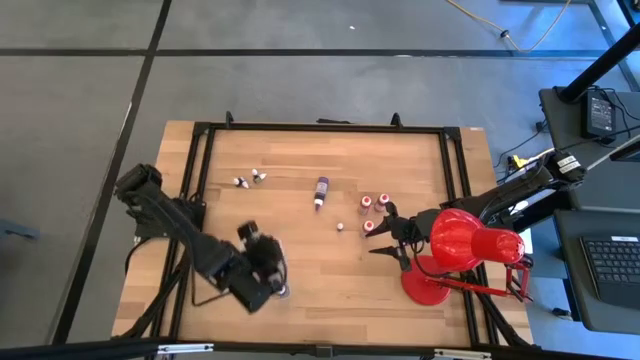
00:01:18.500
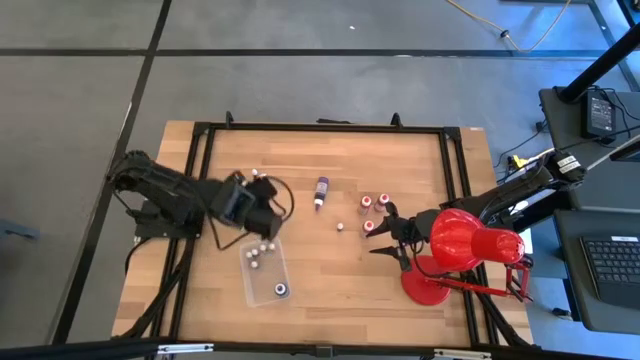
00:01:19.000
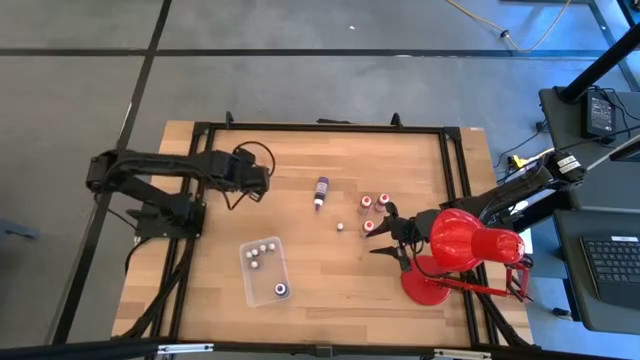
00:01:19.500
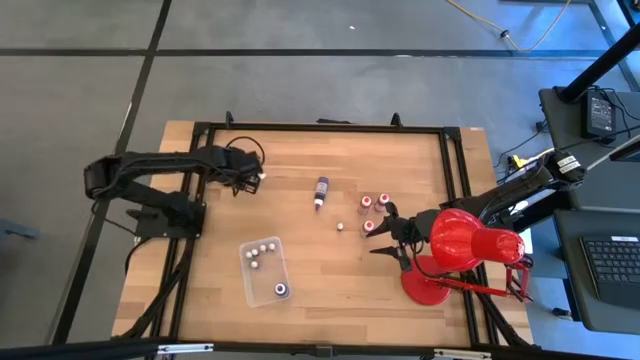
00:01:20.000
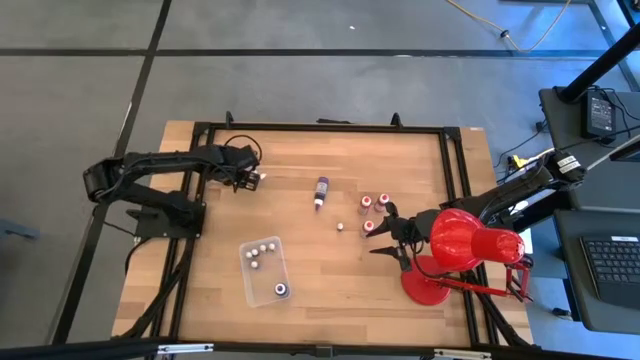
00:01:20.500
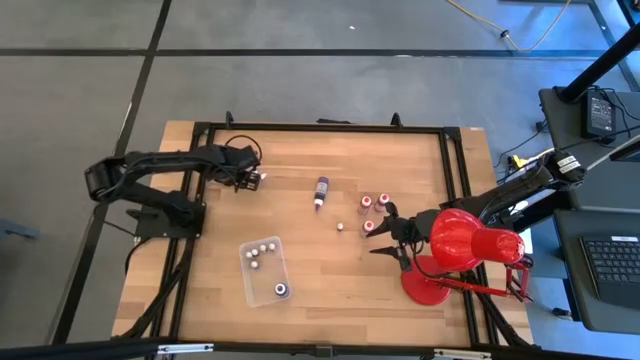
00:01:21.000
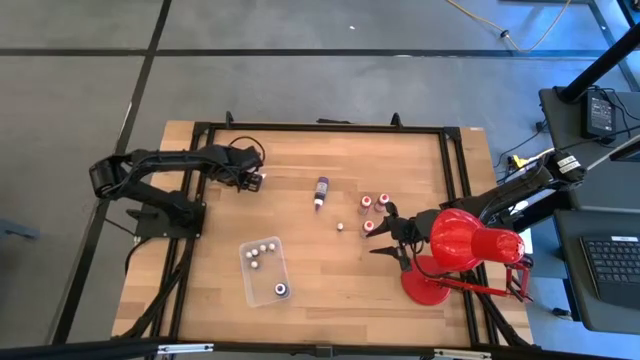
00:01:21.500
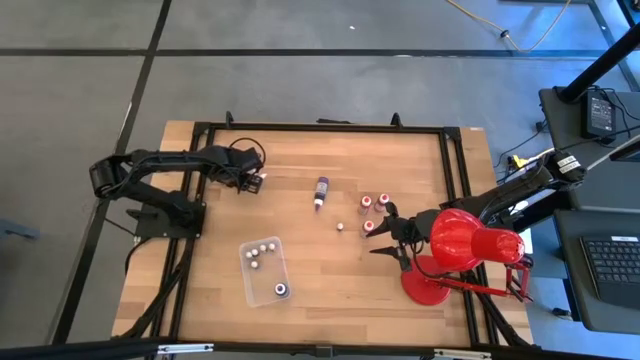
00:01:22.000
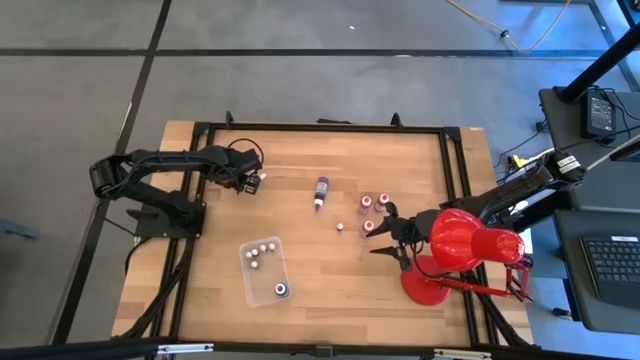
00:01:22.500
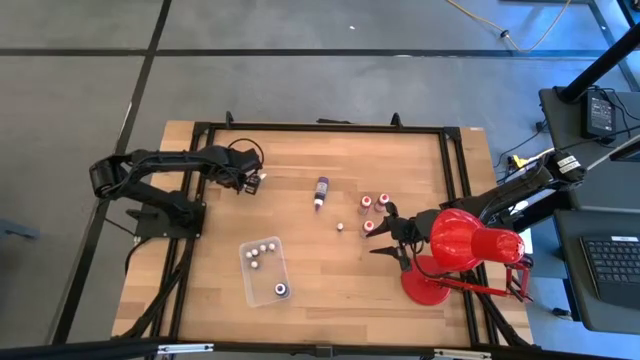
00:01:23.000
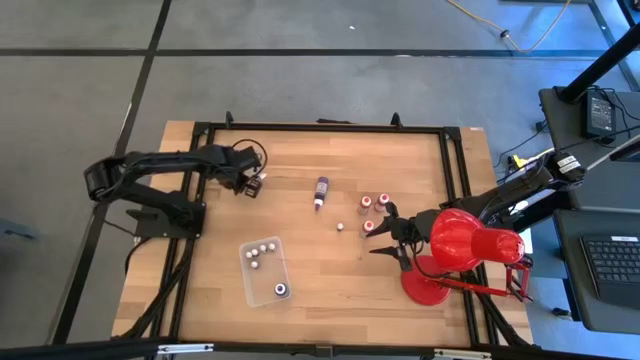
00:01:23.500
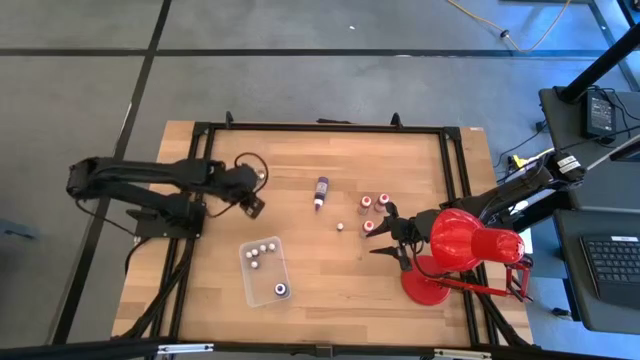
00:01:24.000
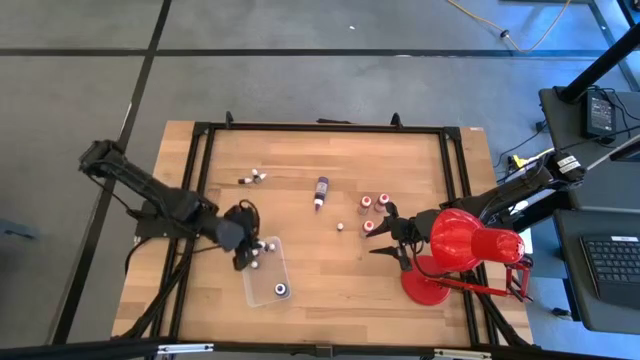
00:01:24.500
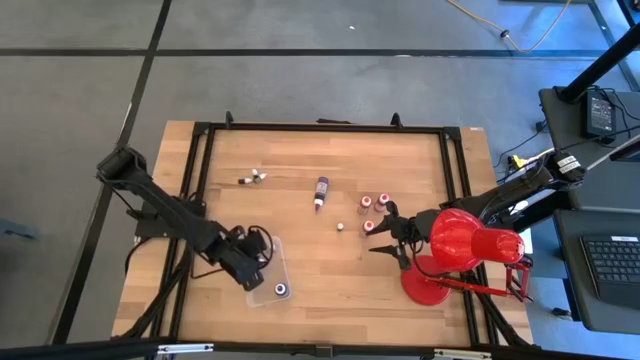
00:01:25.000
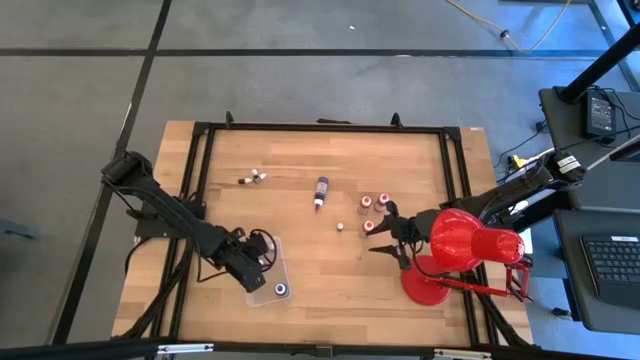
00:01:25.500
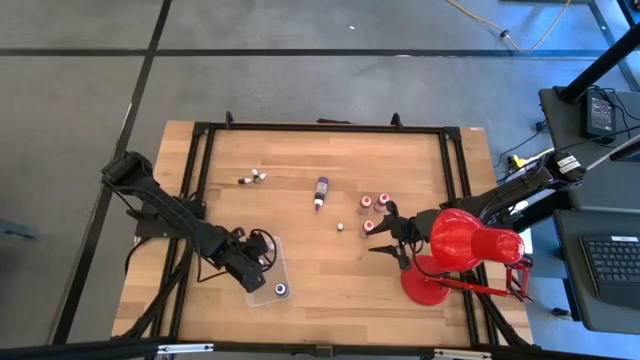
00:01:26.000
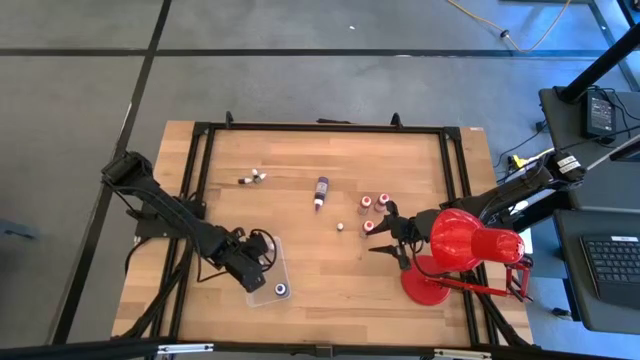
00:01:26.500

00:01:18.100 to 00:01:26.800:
Task: Pick & Place food coloring
Put the small green food coloring bottle into the bin

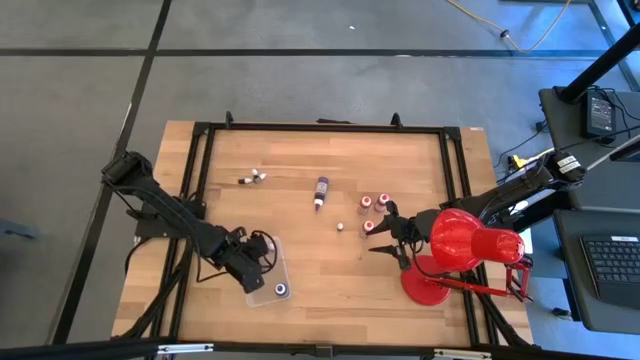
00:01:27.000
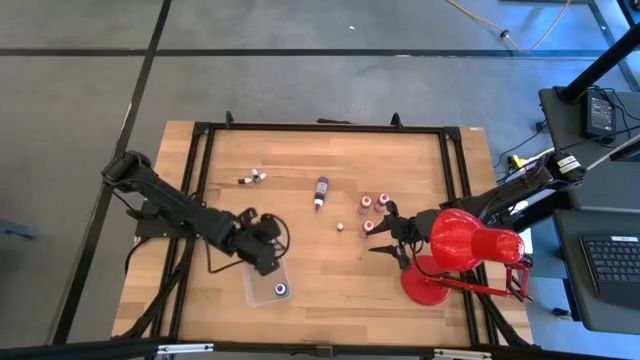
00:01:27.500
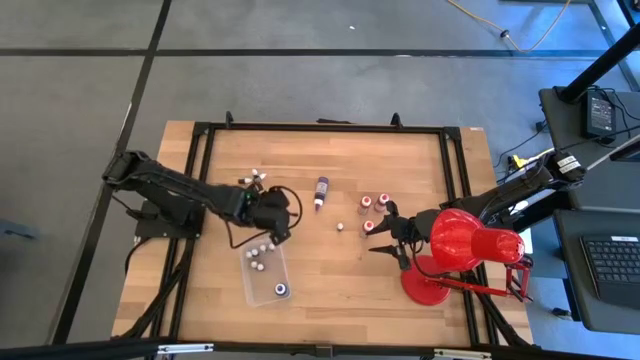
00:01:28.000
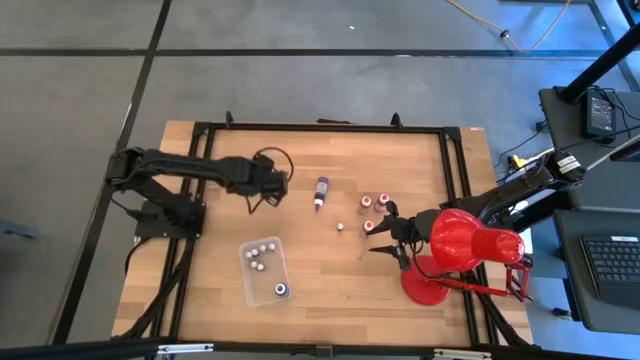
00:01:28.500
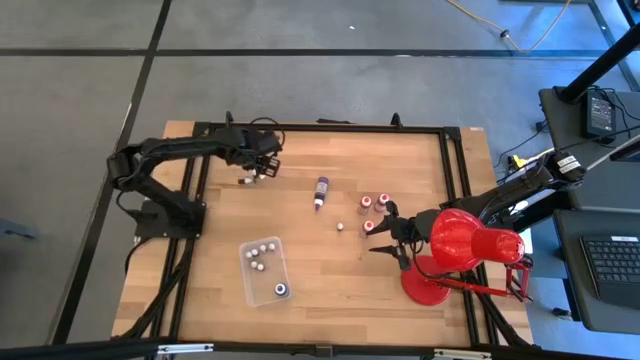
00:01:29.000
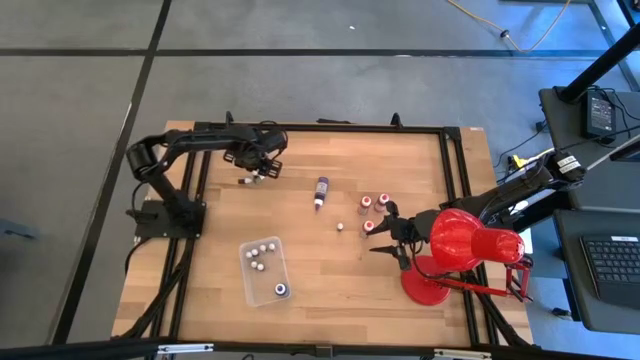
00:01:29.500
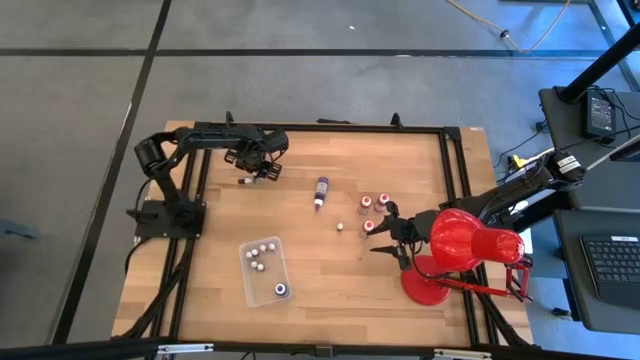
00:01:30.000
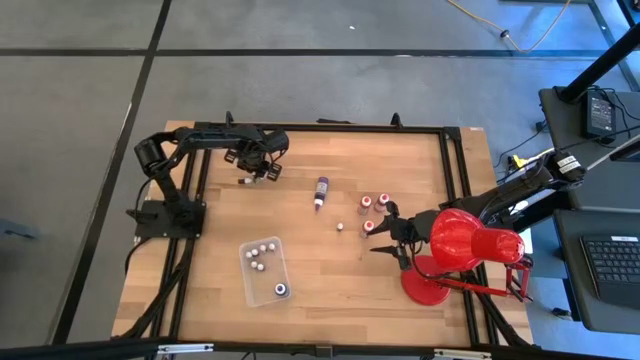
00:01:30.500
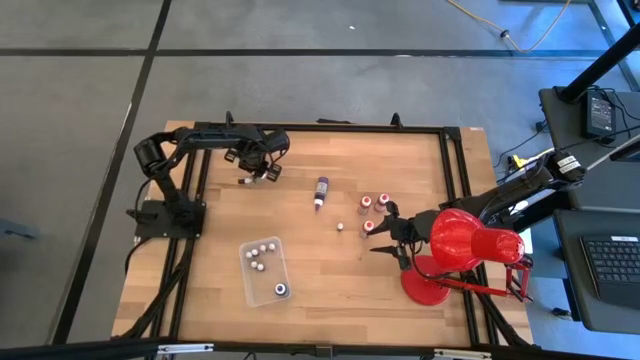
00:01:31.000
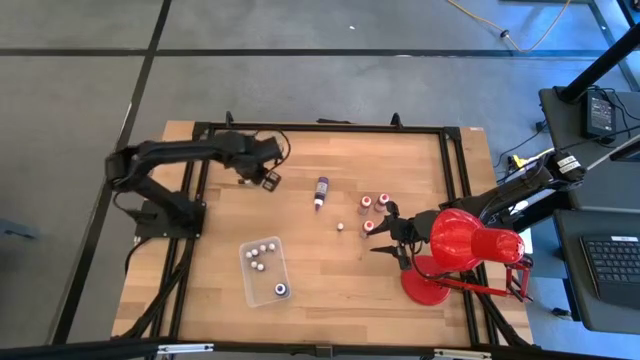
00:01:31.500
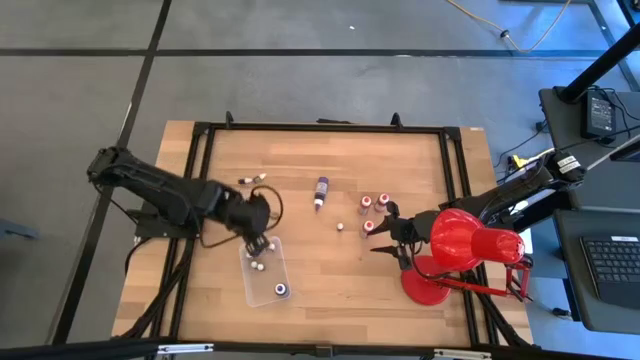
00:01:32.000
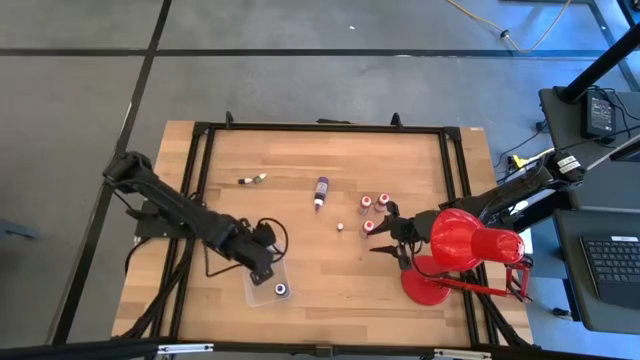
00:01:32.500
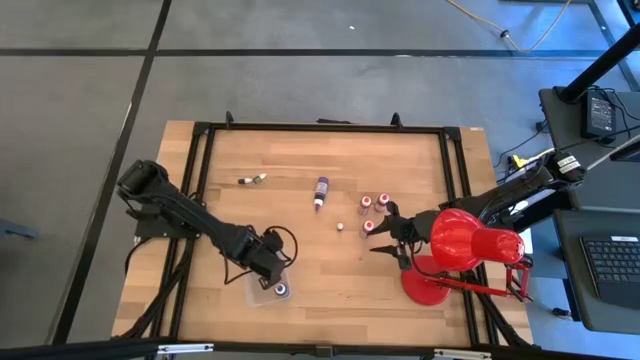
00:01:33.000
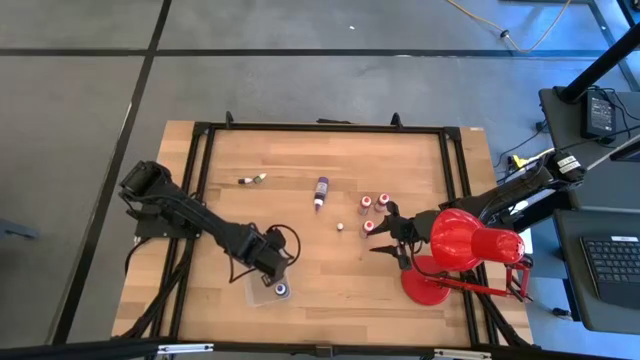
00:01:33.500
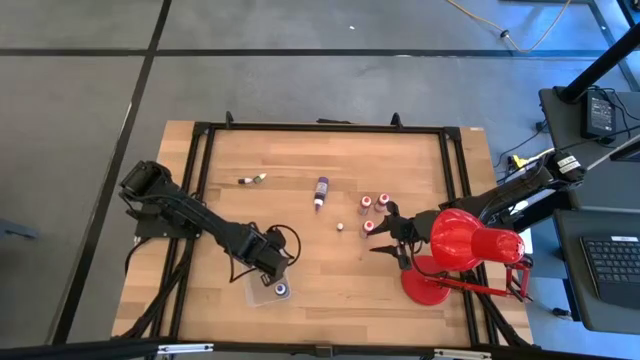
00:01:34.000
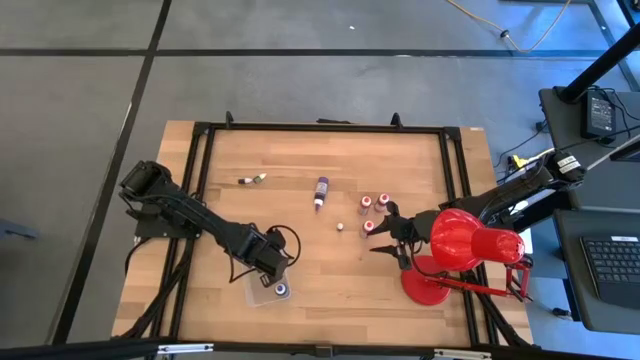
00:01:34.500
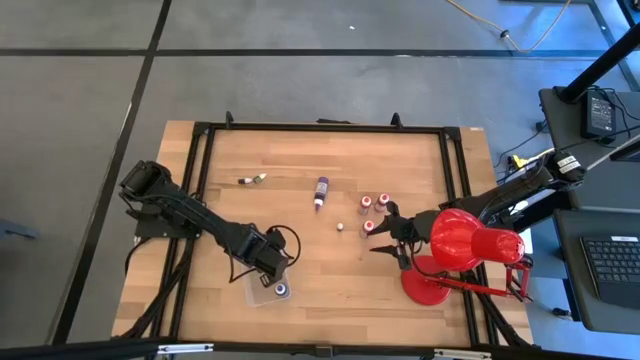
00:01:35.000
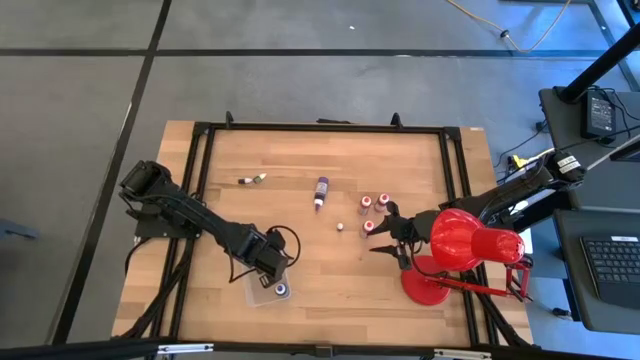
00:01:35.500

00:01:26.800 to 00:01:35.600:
Put the small black food coloring bottle into the bin

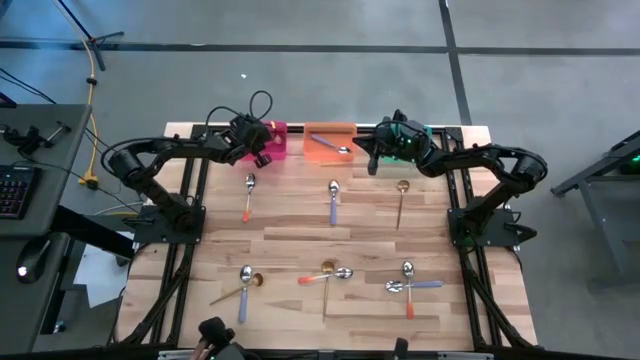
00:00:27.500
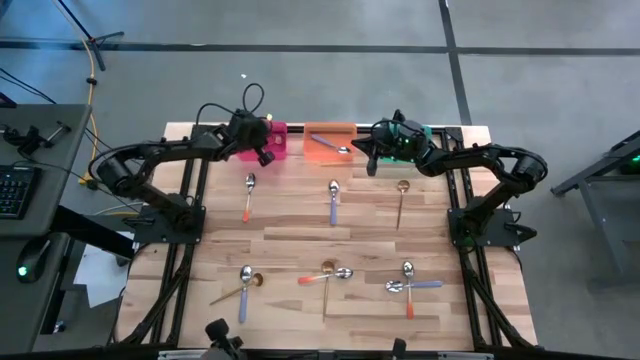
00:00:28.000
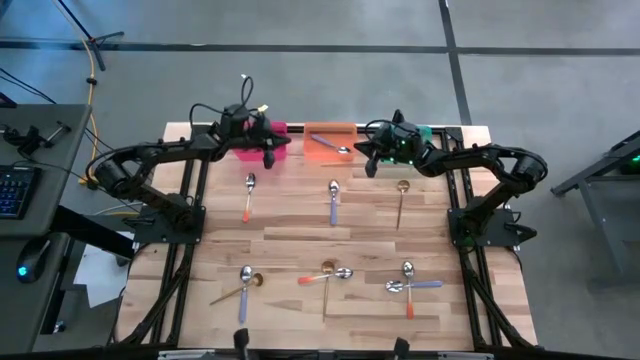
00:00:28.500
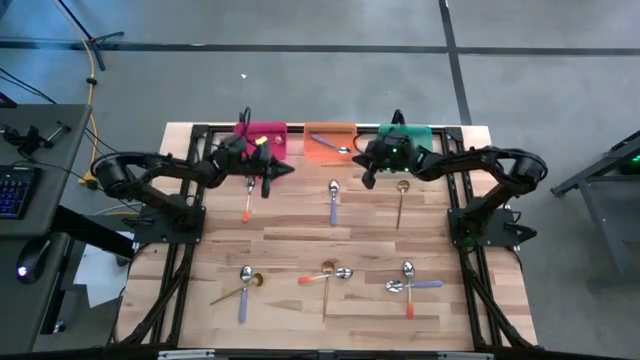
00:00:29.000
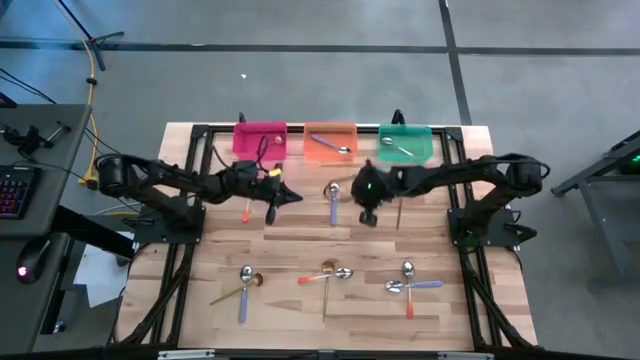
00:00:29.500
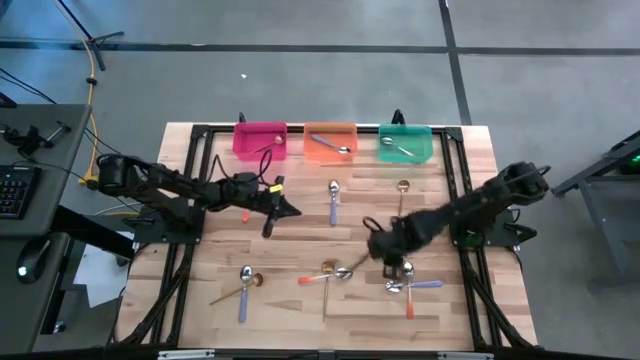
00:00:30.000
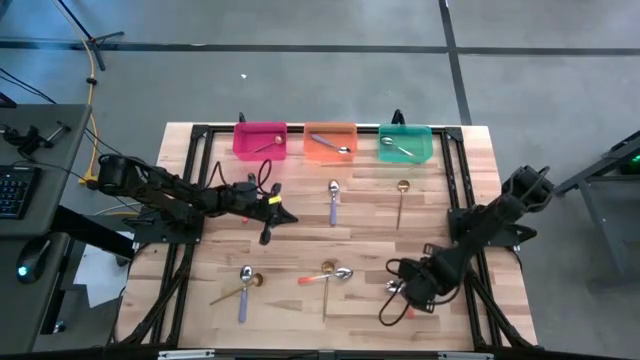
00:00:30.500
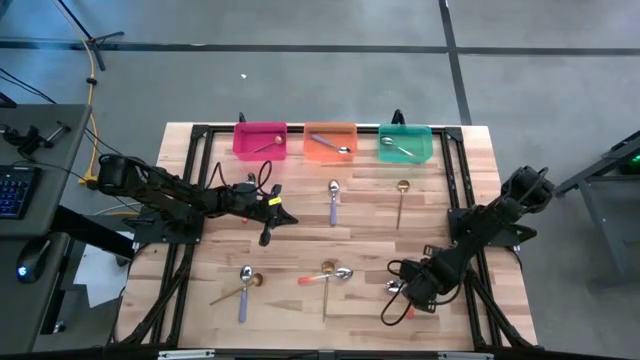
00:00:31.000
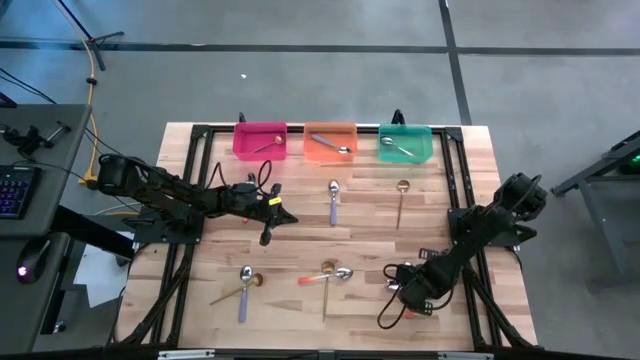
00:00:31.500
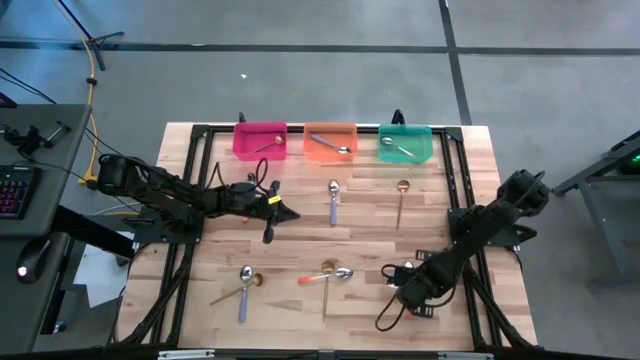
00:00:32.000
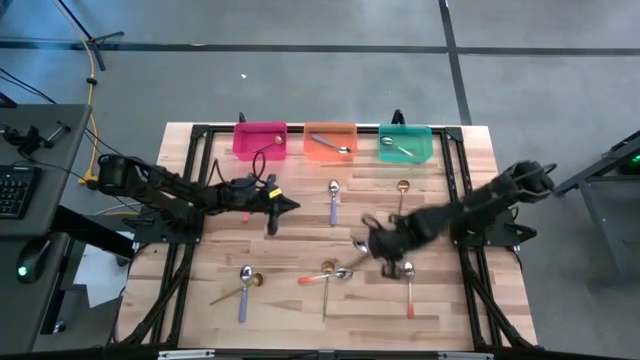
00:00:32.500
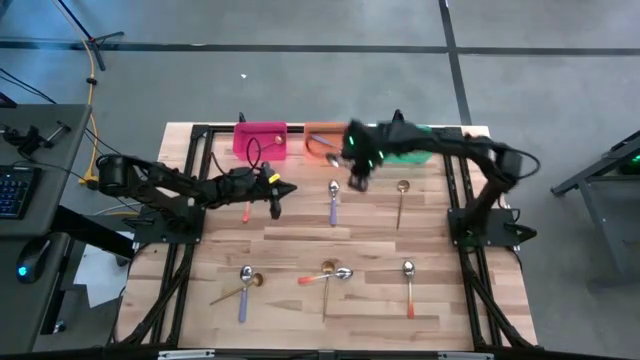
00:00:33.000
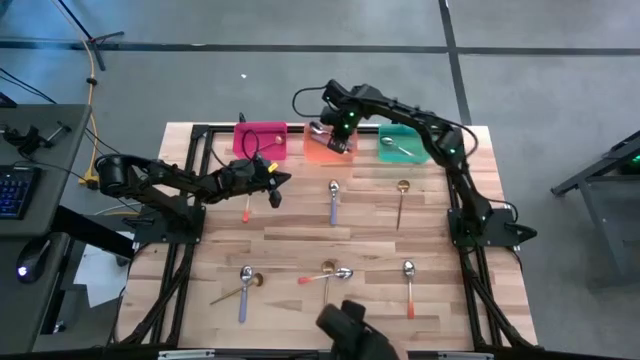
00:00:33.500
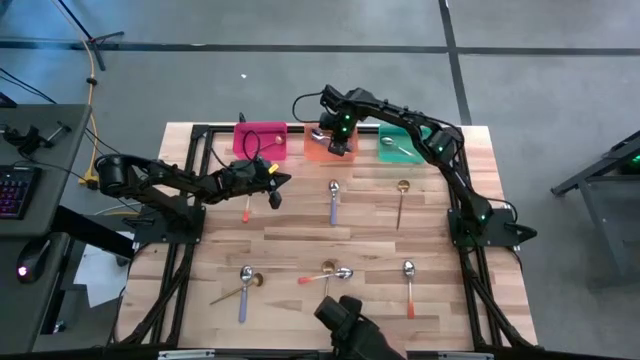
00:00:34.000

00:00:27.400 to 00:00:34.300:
Task: Sort silverware by color (type)
Put the bottom right light violet spoon into the orange bin
